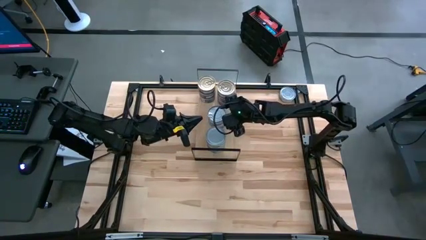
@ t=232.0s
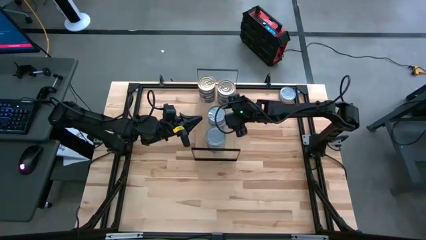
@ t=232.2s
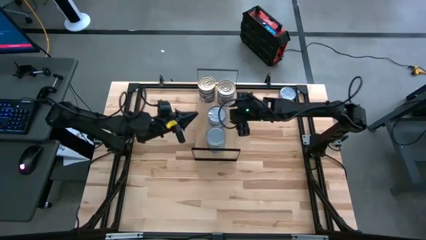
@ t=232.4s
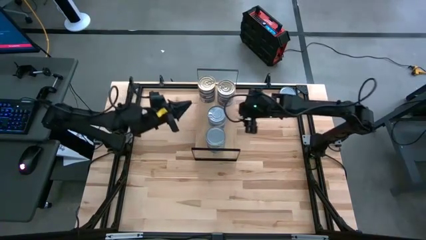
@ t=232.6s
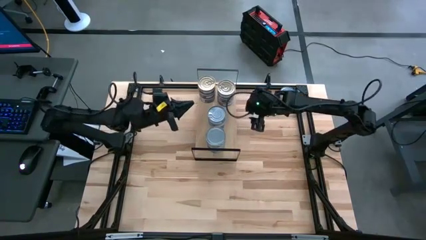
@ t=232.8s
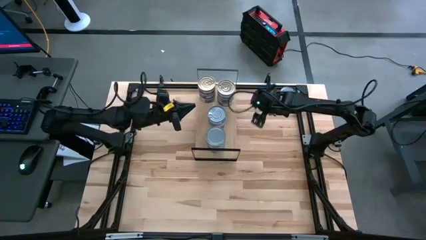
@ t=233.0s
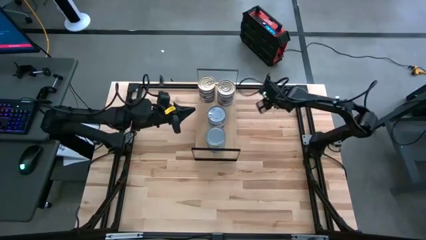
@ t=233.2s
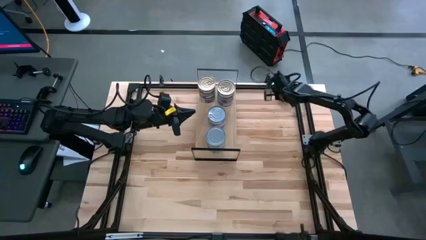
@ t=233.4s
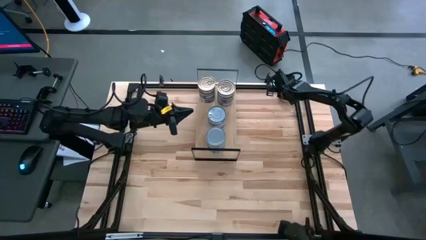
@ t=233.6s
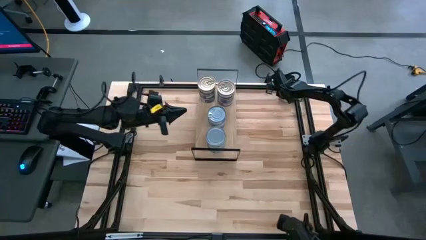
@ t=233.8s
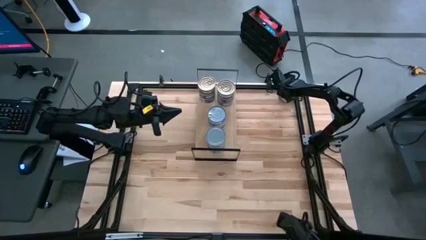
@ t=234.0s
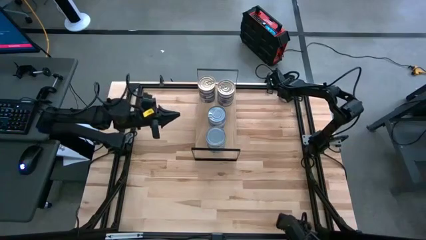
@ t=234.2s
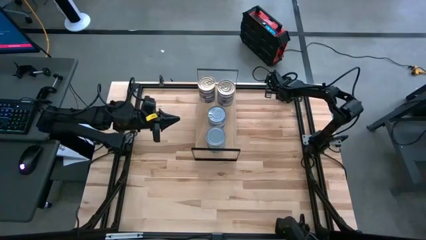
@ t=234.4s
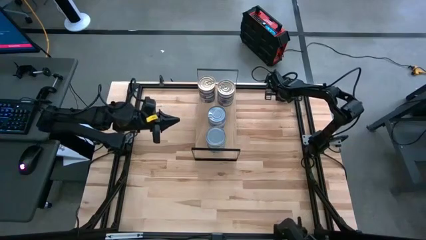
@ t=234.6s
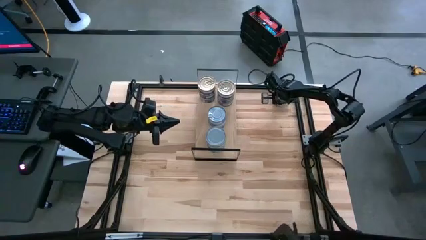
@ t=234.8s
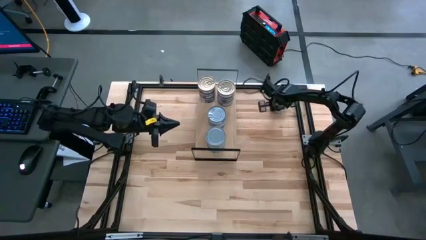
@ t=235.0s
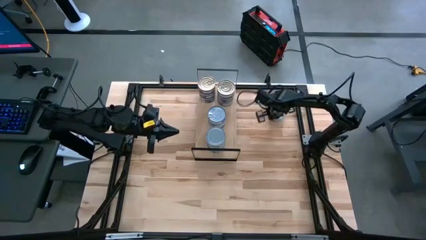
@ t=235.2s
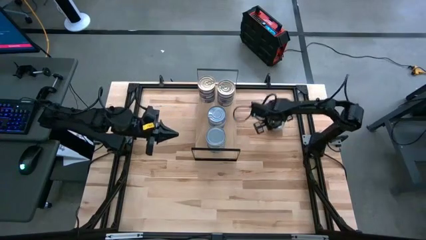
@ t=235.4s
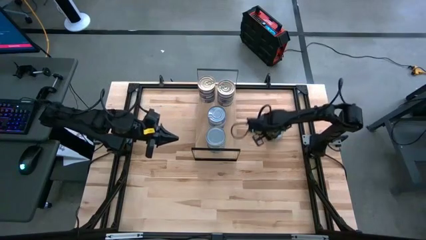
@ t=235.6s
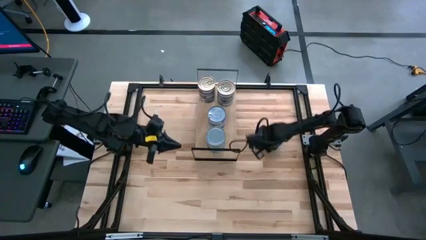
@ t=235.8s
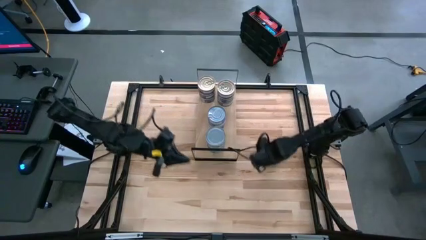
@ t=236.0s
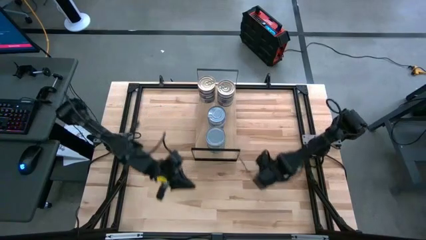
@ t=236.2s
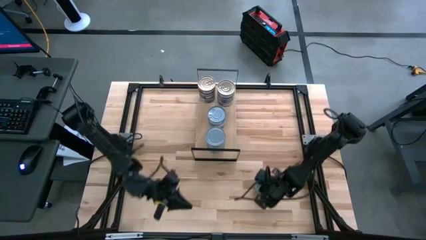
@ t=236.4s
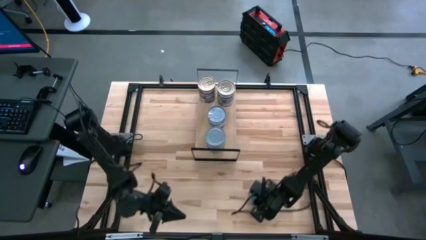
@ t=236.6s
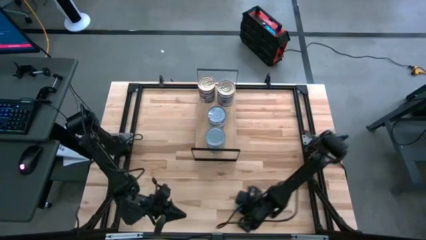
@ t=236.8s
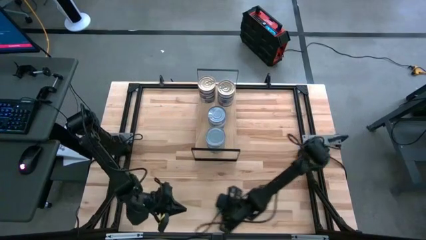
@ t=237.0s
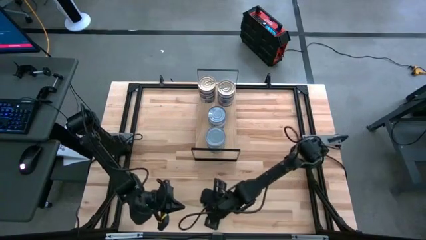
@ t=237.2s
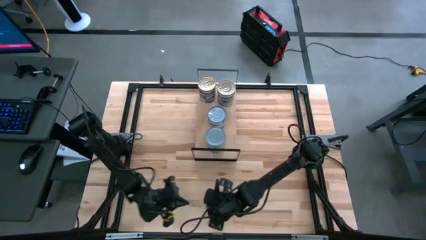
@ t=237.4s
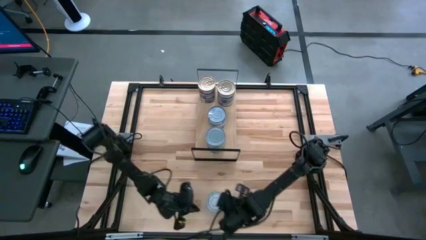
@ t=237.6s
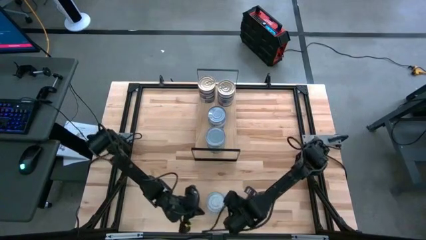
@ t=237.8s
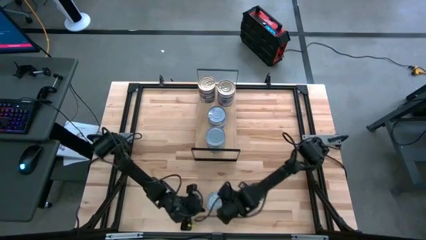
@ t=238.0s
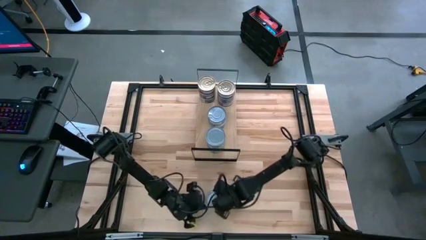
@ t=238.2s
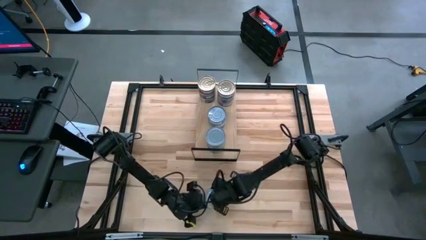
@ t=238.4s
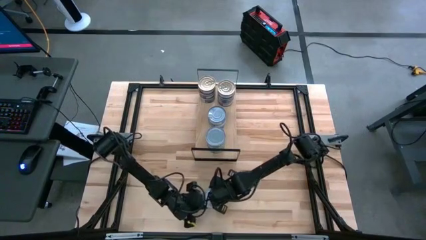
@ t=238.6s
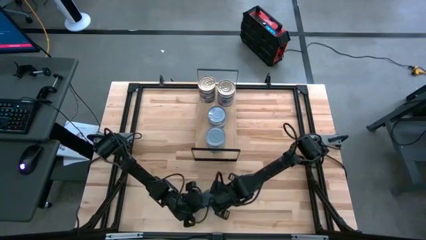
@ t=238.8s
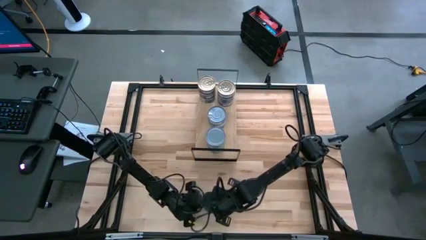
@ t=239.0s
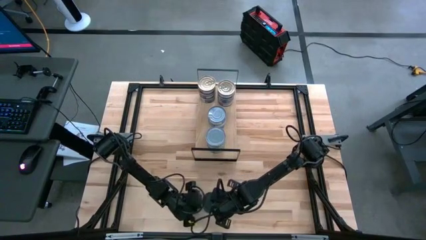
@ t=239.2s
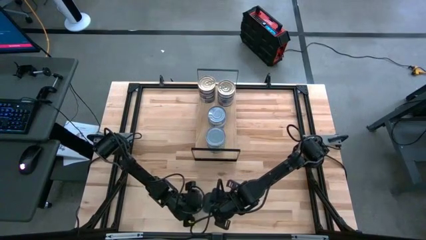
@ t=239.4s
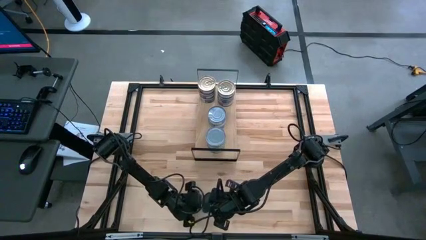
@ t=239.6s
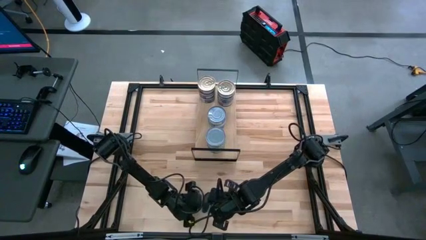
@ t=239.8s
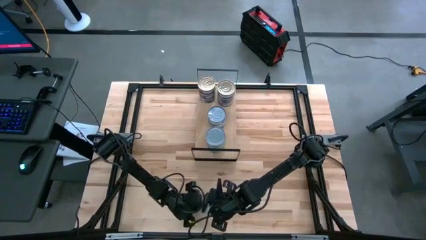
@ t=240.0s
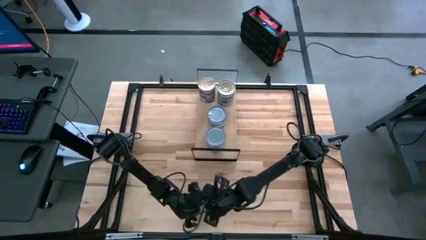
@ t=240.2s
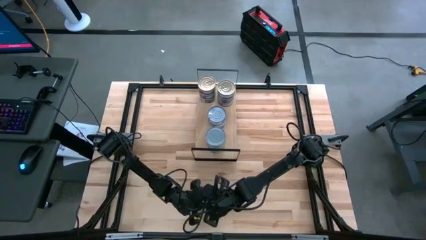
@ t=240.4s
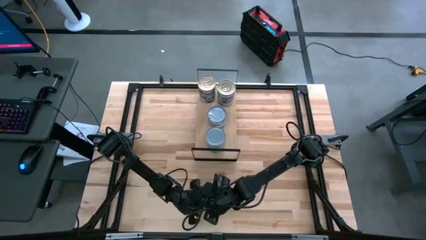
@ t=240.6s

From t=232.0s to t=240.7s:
Task: Stack canned seafood by type on shelf
Stack the green tuna can on top of the other green tuna cans on the shelf
